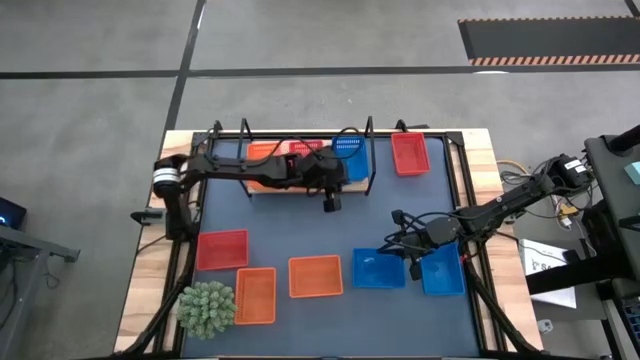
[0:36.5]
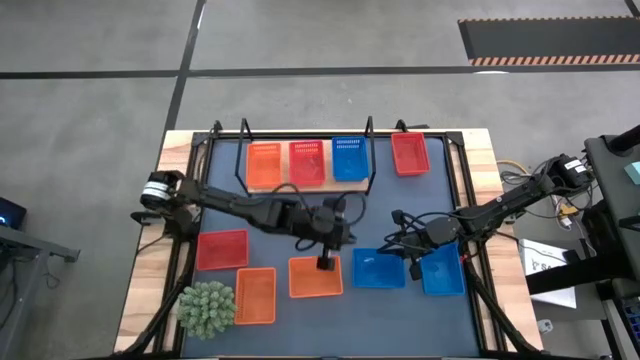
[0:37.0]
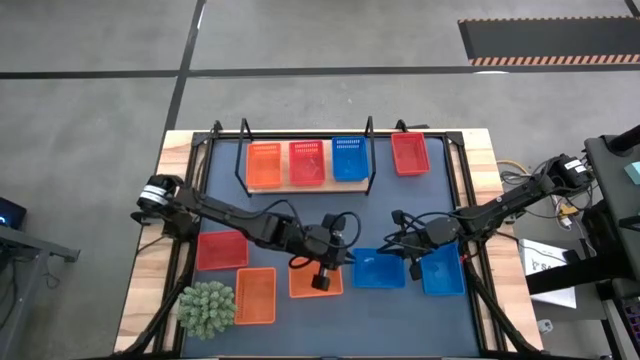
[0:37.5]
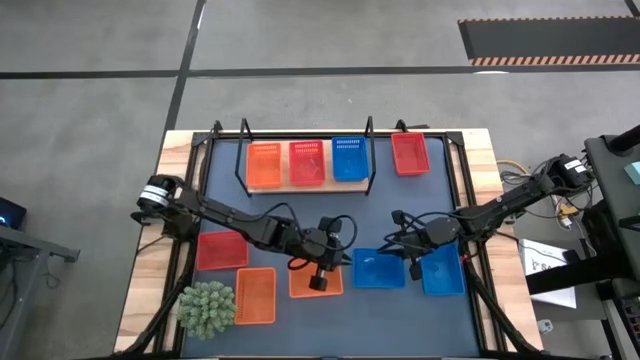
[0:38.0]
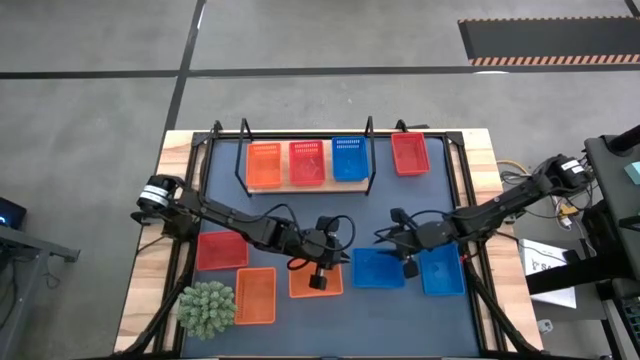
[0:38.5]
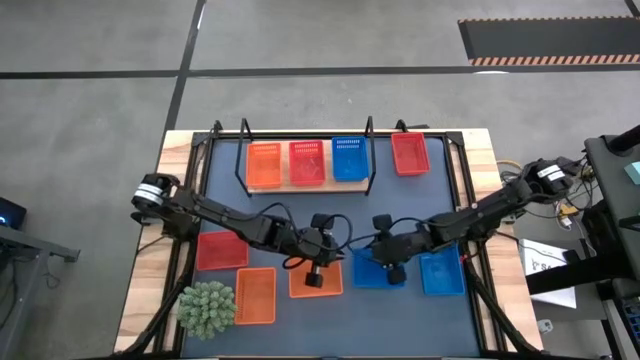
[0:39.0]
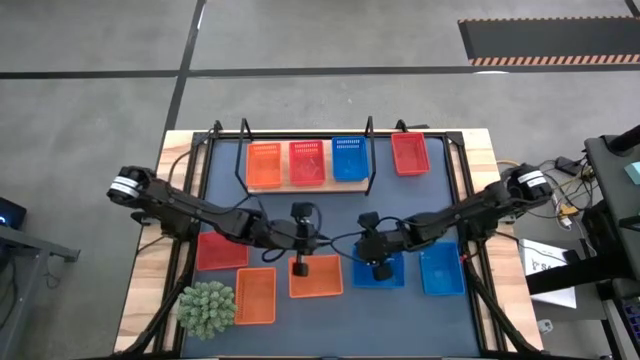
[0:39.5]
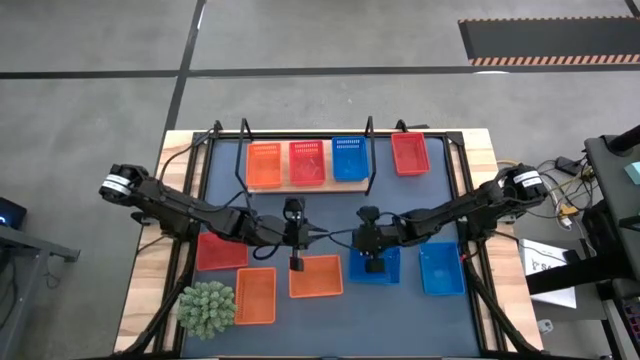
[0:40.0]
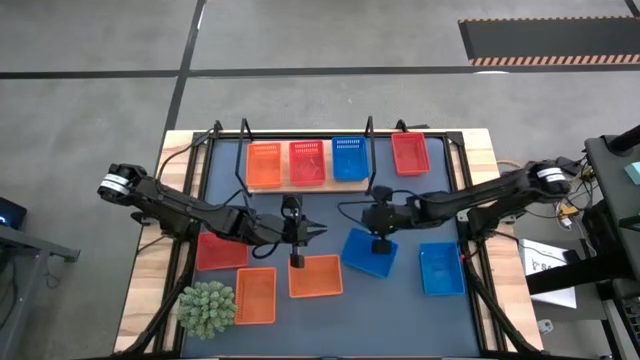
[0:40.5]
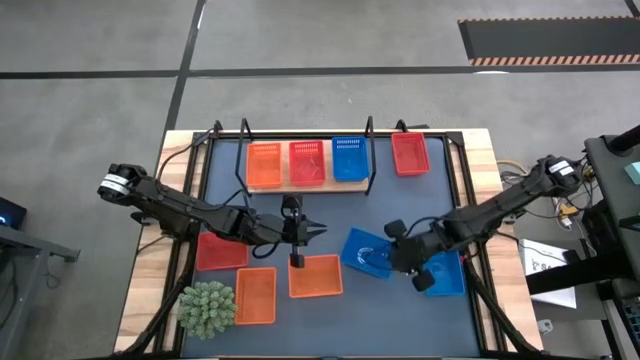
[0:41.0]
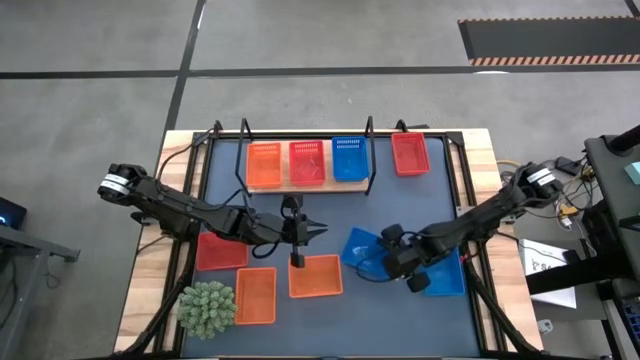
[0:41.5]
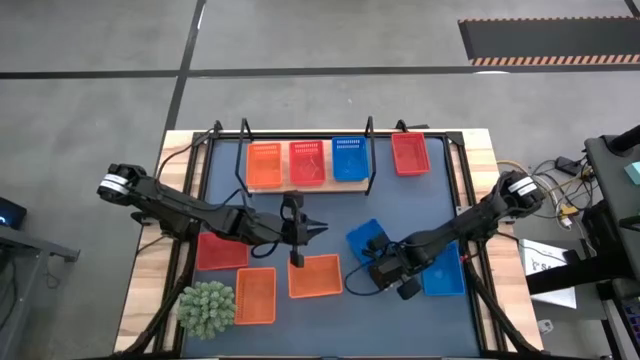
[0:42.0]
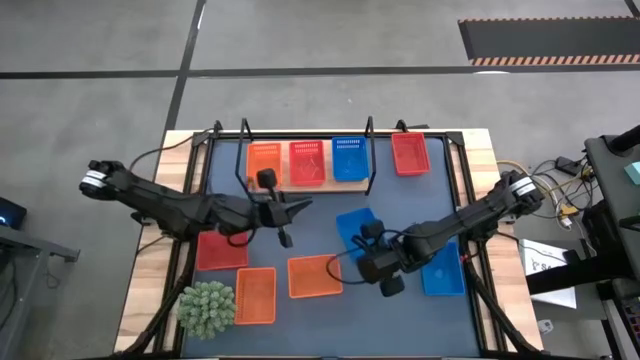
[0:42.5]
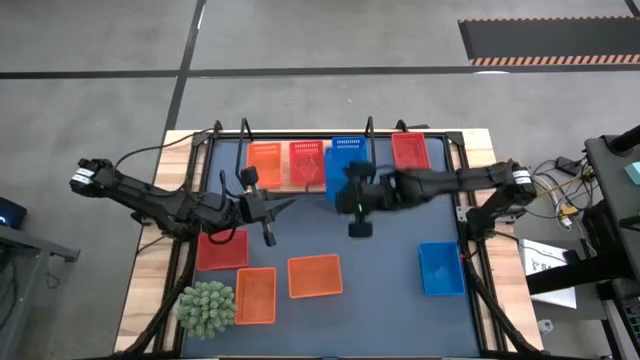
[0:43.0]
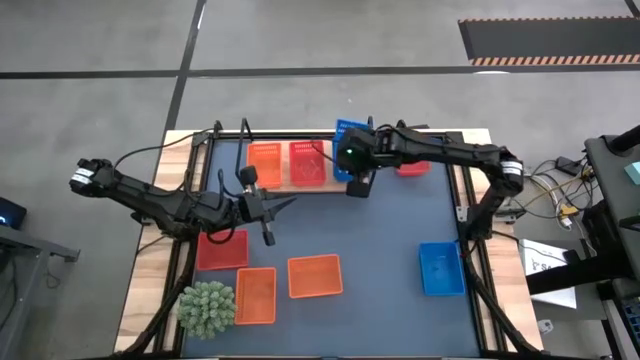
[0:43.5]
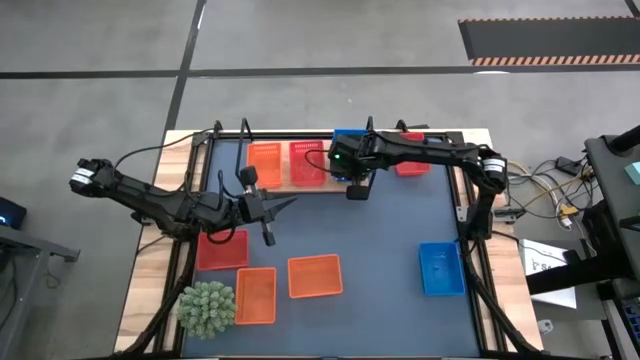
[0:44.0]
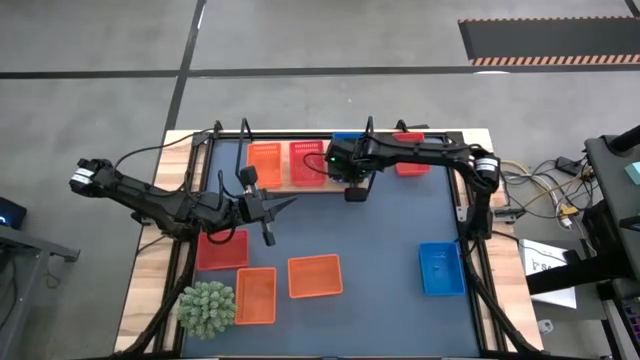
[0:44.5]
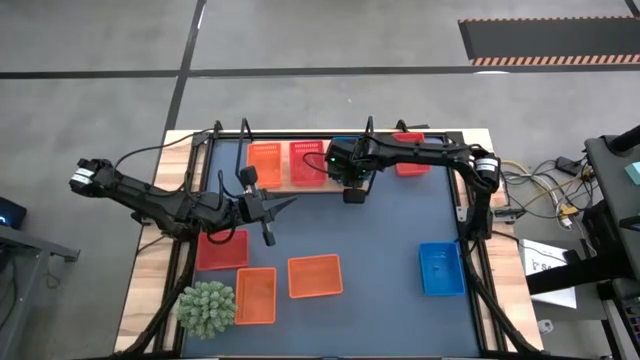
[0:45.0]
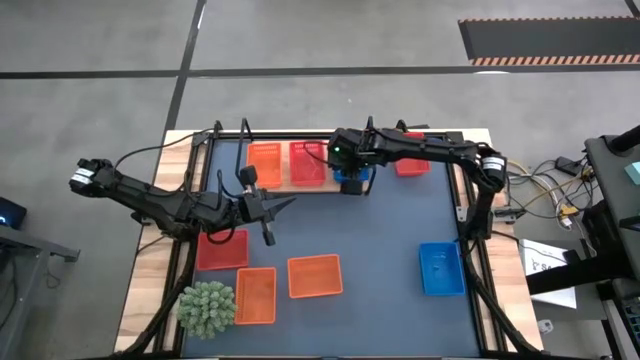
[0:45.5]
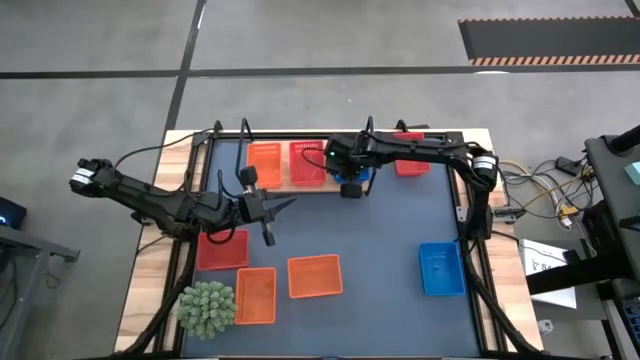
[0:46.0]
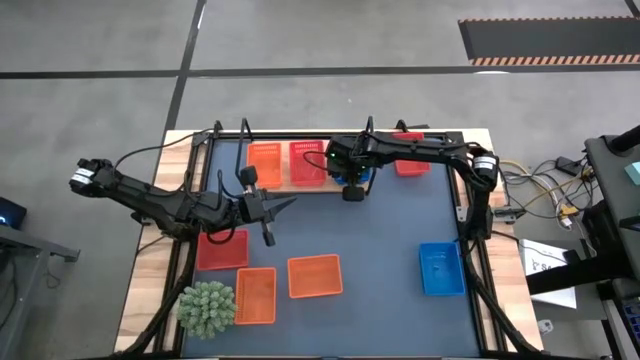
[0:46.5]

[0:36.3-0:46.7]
Task: Stack baskets on shelf by color
Stack the left blue basket on top of the blue basket on the shelf

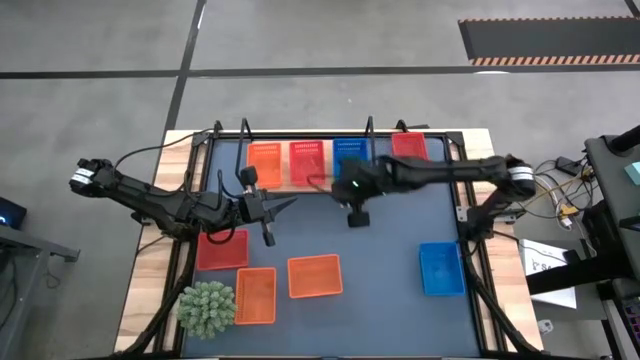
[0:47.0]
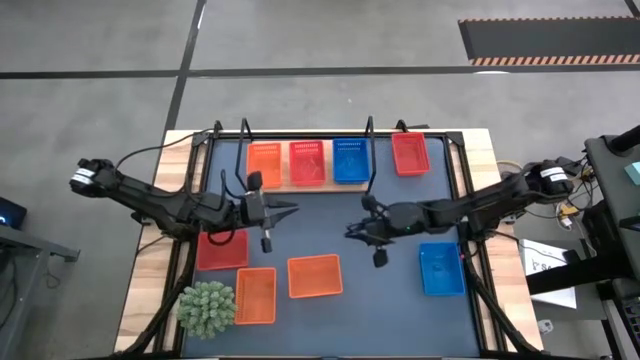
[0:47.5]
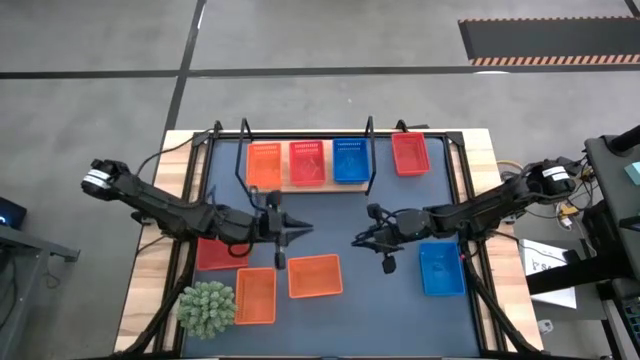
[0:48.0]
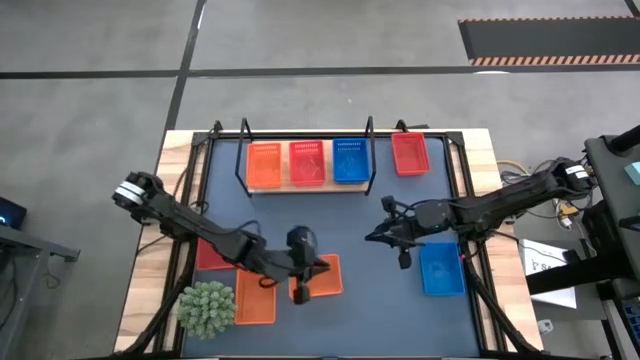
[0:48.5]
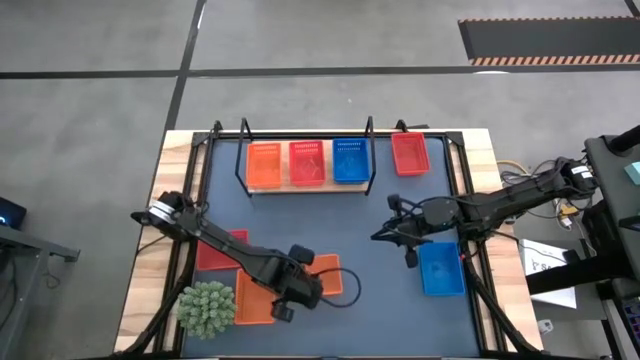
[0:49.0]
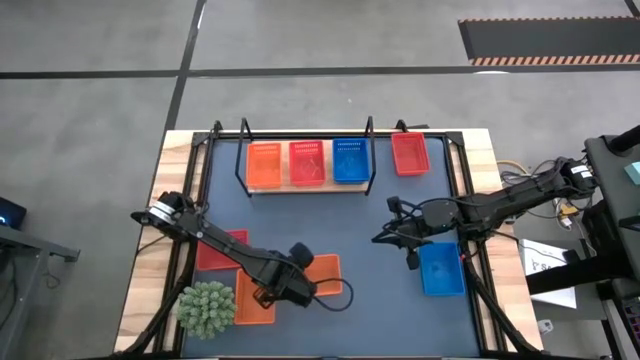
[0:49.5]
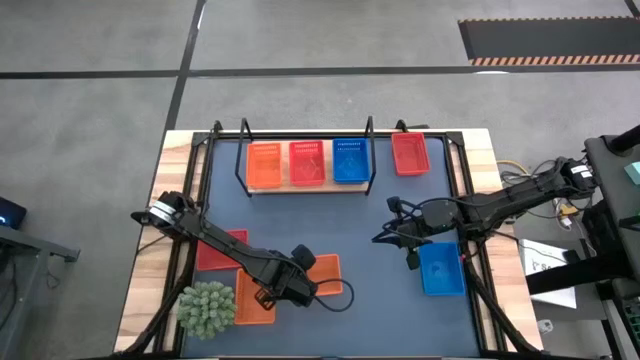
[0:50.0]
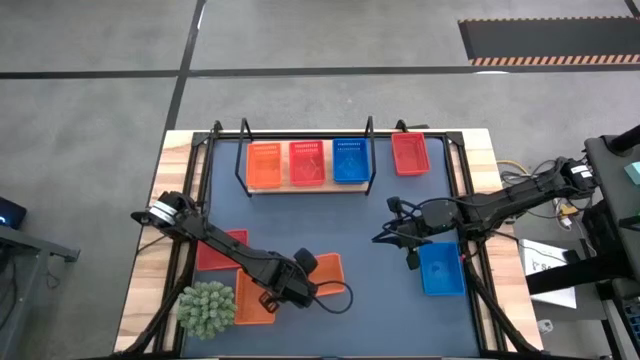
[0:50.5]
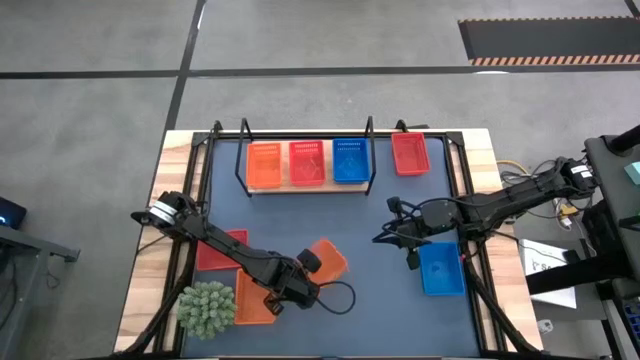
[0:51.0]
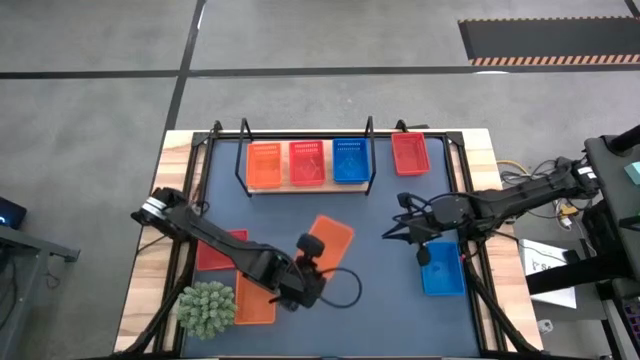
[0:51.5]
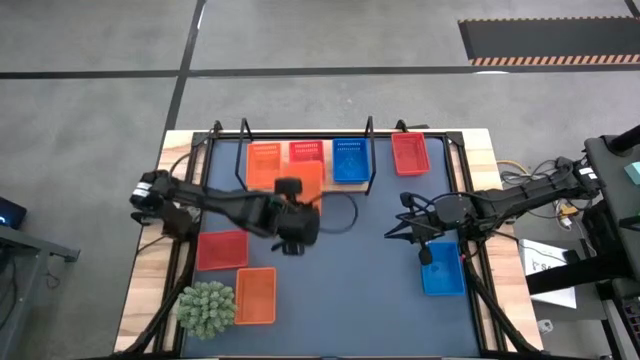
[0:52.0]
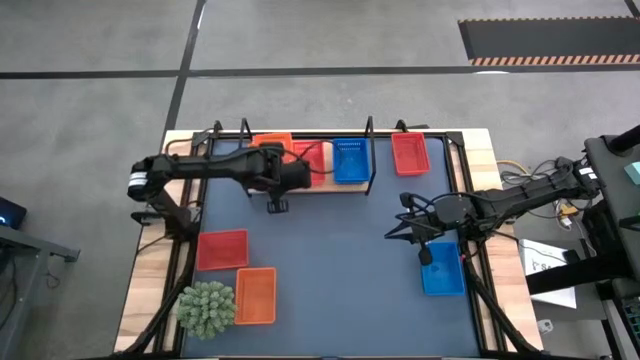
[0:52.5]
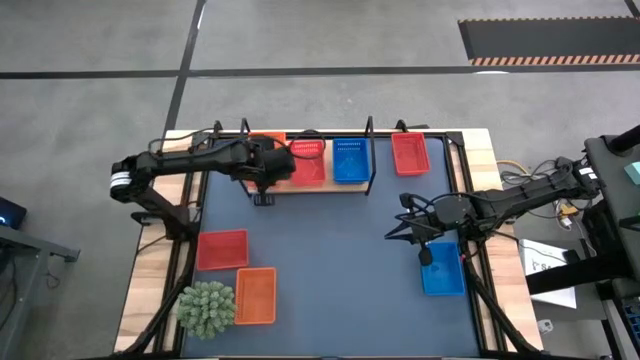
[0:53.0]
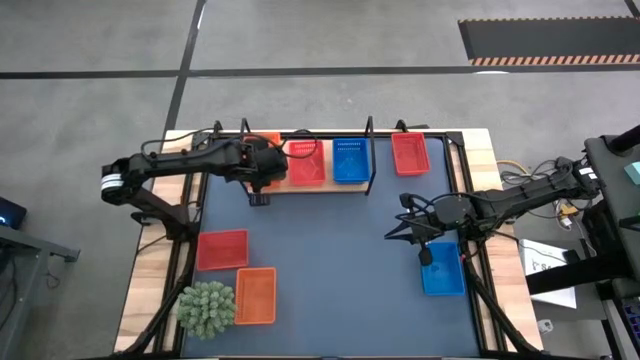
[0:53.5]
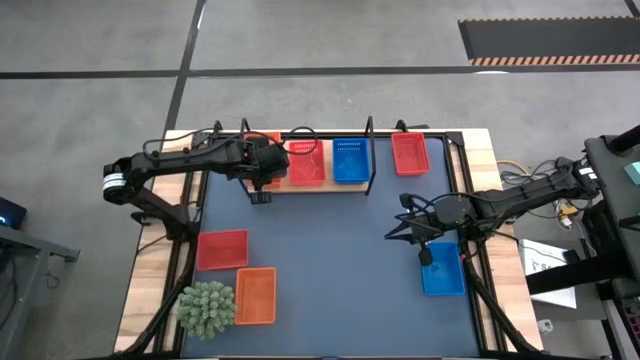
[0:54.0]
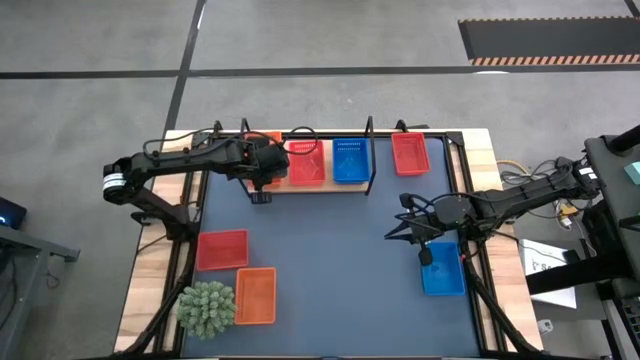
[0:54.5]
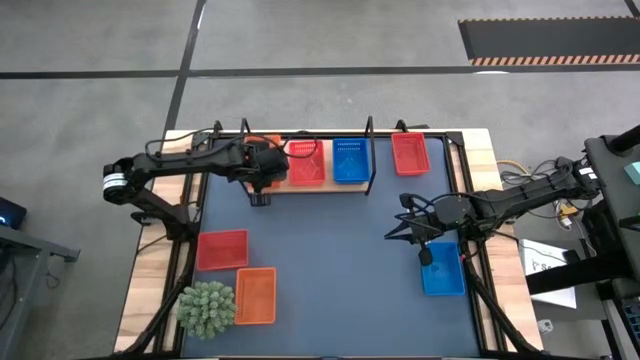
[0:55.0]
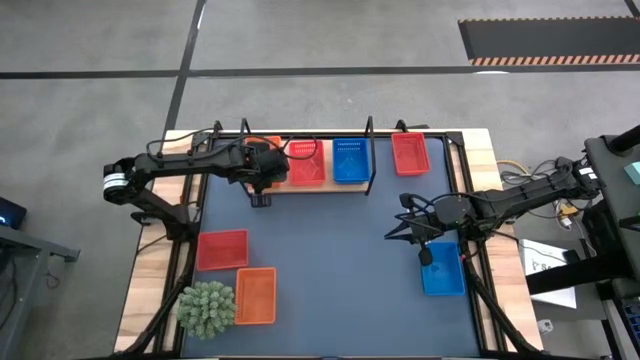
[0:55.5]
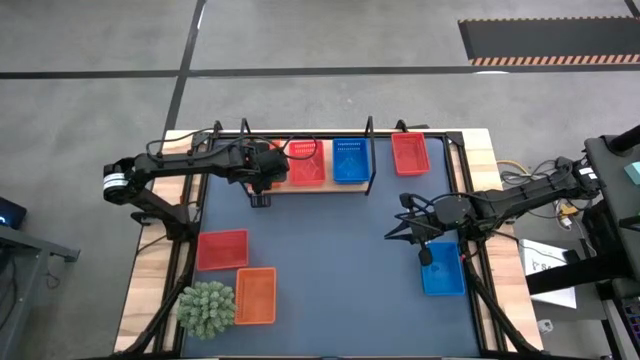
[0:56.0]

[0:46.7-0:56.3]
Stack the right orange basket on top of the orange basket on the shelf

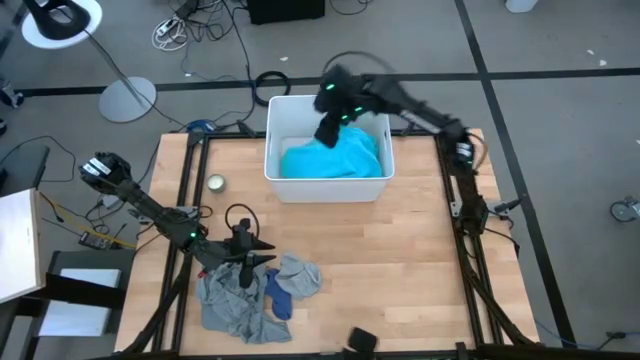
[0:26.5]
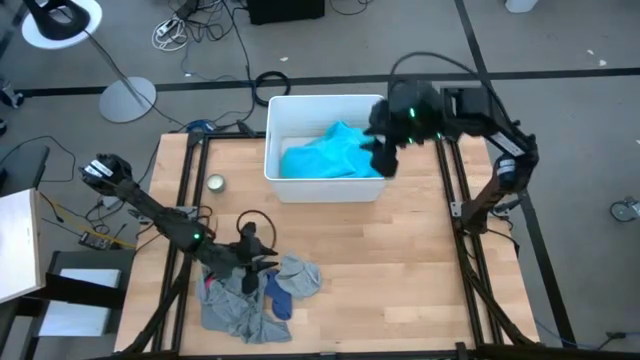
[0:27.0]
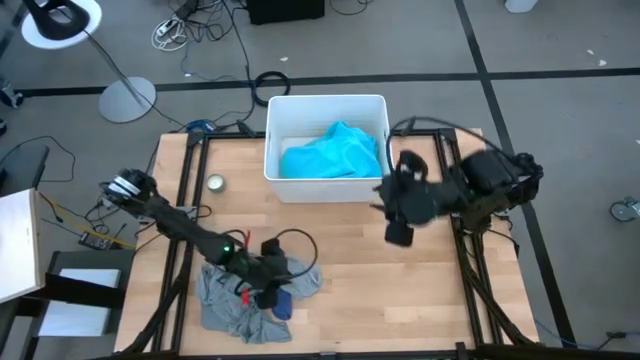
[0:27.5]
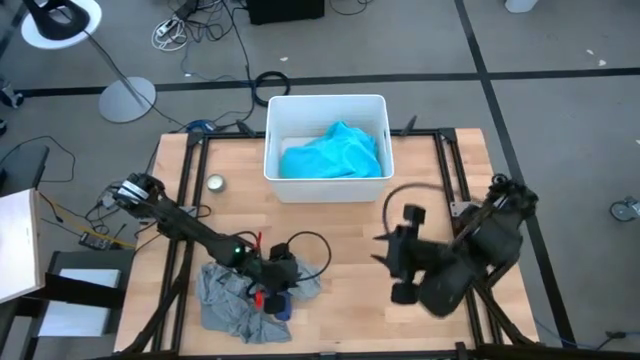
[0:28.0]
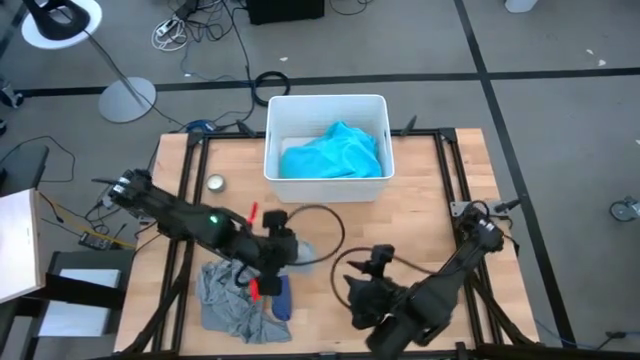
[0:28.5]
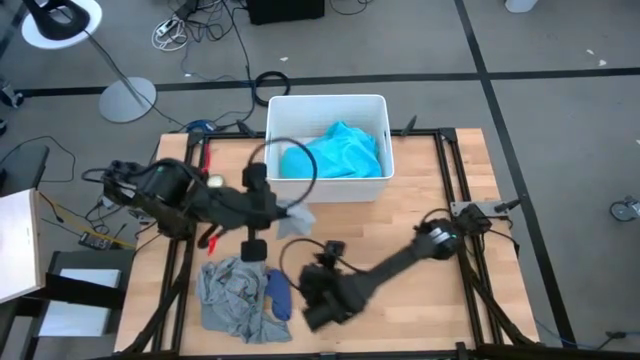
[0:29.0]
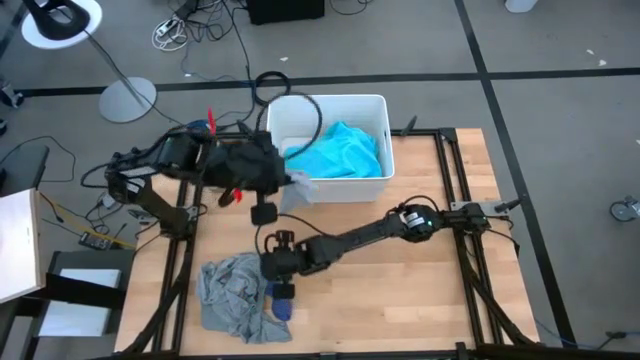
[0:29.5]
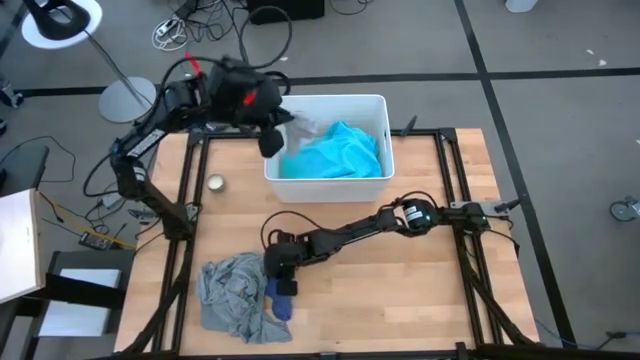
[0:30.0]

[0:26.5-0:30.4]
Task: Sort clothes
Put the gray sock into the white laundry bin
